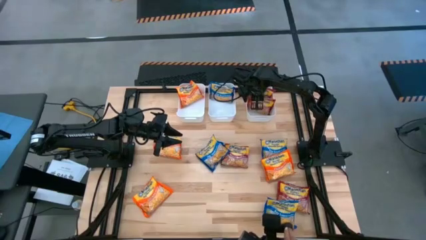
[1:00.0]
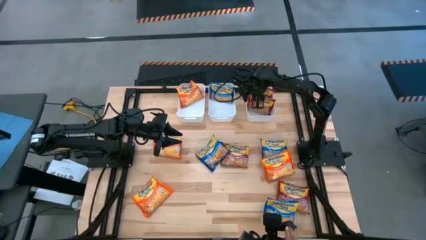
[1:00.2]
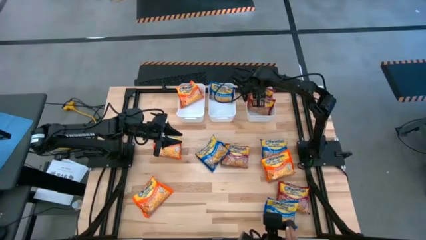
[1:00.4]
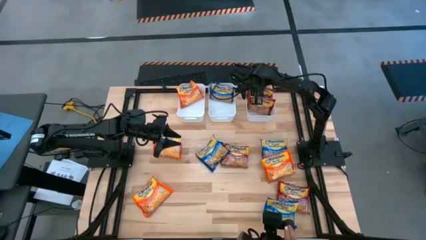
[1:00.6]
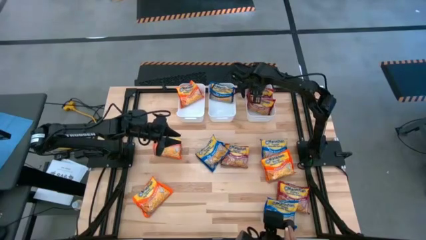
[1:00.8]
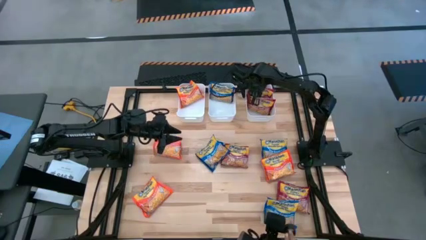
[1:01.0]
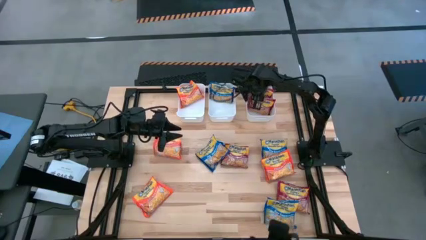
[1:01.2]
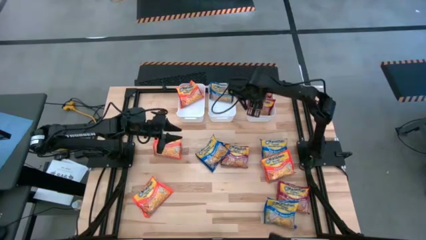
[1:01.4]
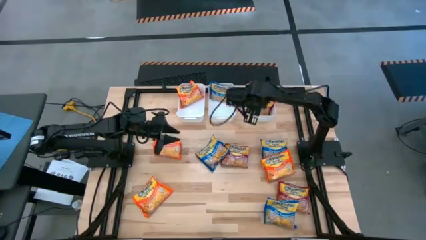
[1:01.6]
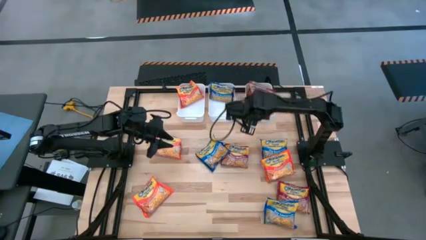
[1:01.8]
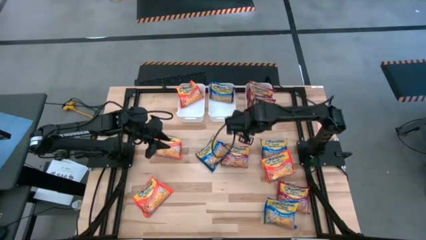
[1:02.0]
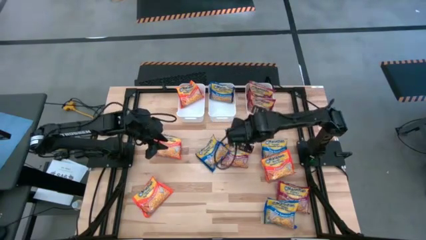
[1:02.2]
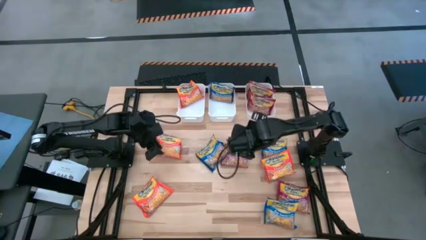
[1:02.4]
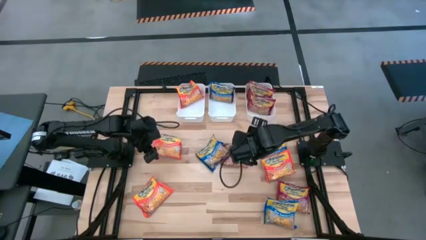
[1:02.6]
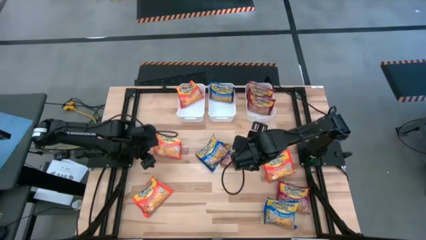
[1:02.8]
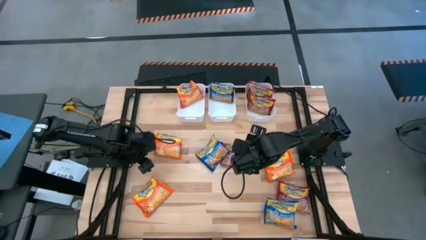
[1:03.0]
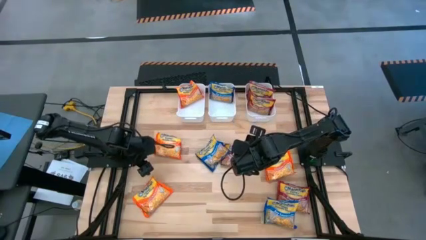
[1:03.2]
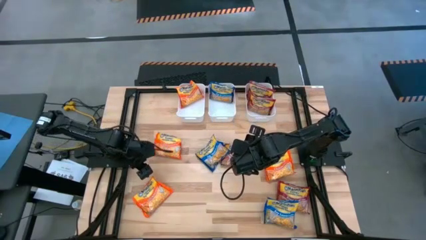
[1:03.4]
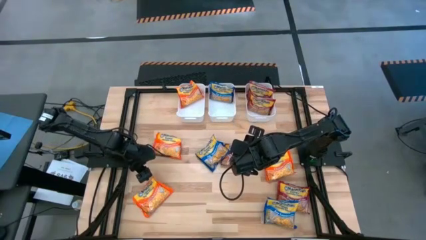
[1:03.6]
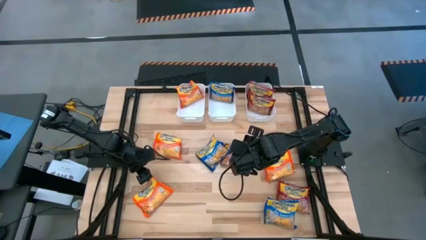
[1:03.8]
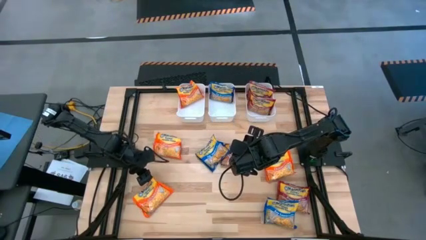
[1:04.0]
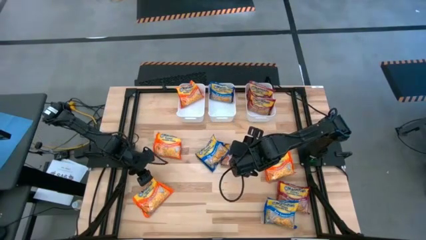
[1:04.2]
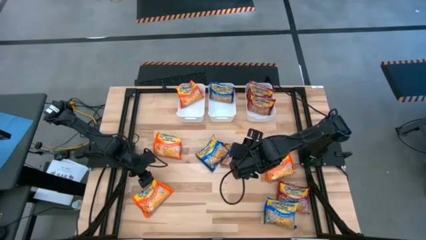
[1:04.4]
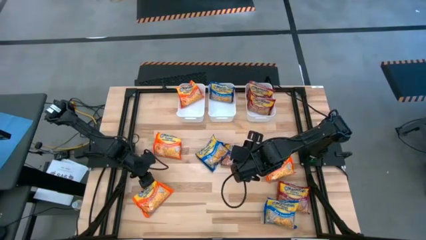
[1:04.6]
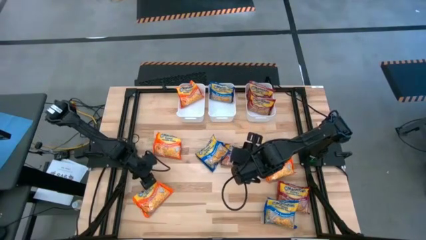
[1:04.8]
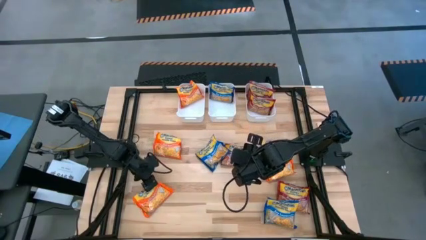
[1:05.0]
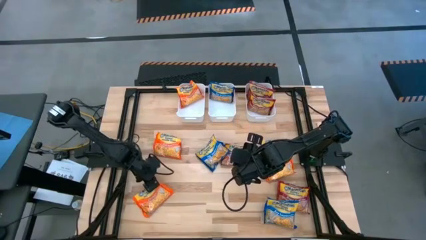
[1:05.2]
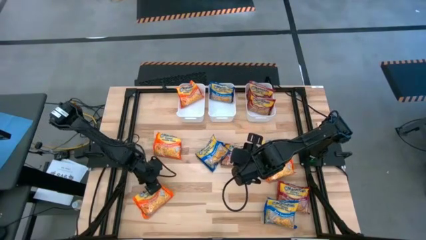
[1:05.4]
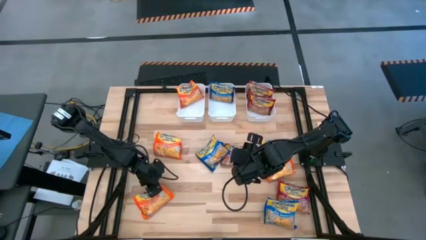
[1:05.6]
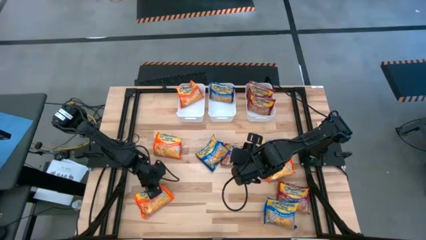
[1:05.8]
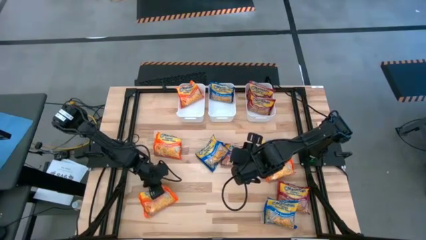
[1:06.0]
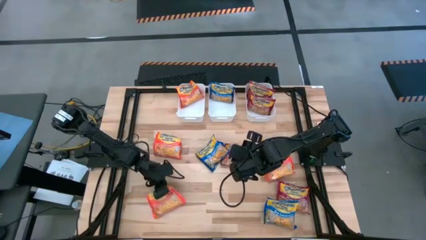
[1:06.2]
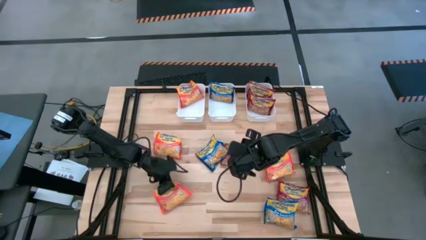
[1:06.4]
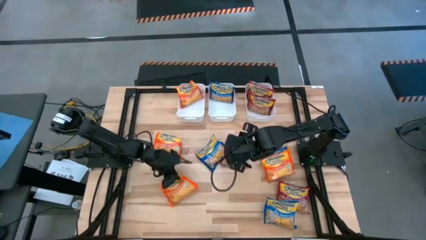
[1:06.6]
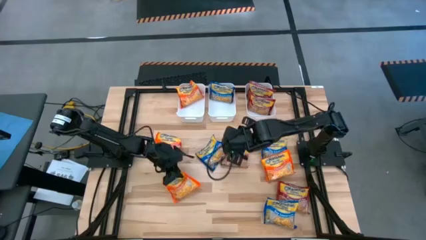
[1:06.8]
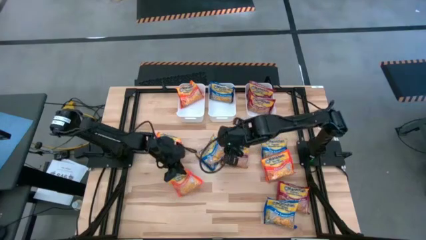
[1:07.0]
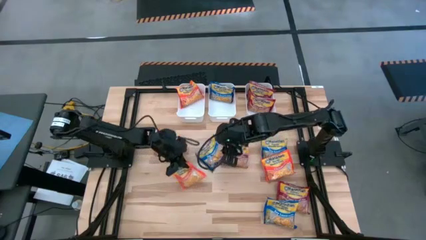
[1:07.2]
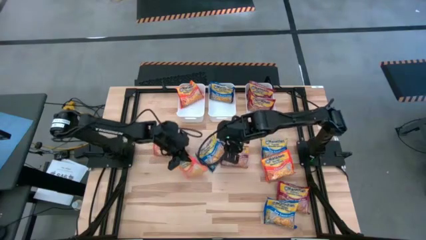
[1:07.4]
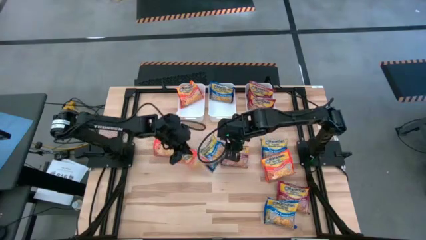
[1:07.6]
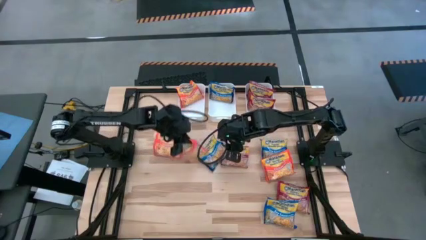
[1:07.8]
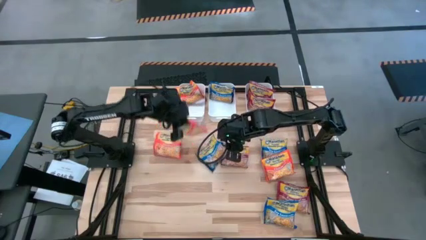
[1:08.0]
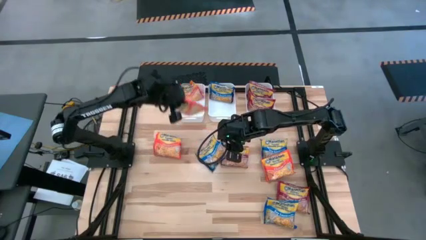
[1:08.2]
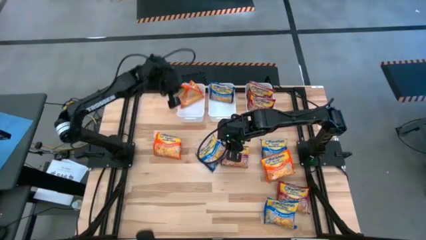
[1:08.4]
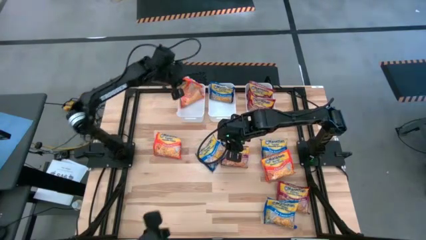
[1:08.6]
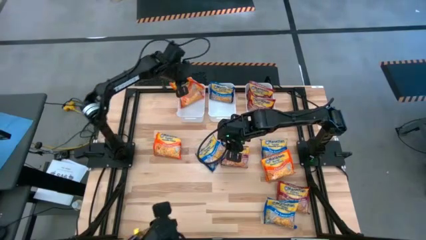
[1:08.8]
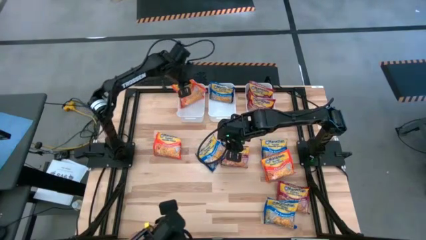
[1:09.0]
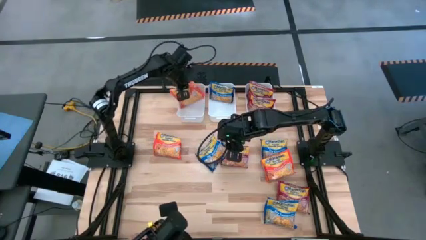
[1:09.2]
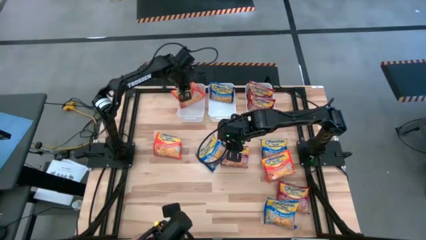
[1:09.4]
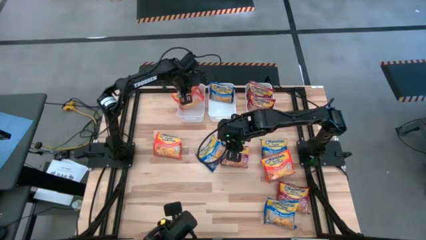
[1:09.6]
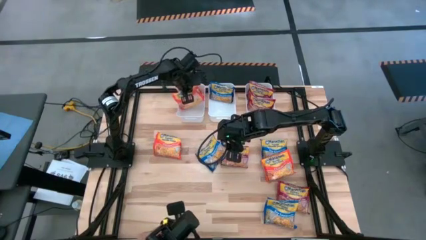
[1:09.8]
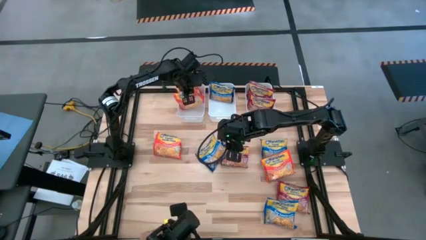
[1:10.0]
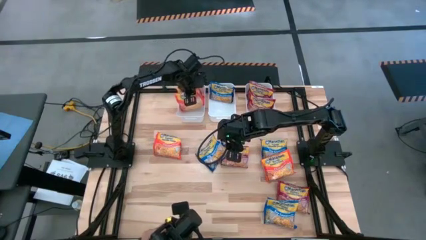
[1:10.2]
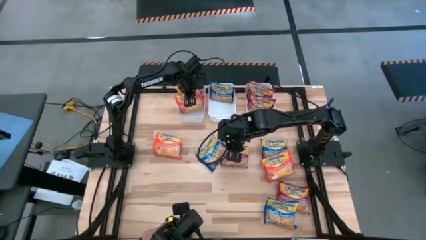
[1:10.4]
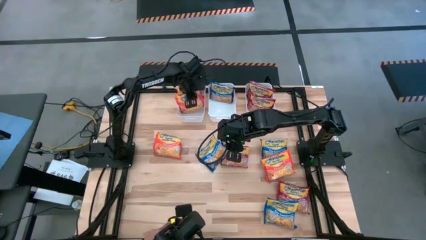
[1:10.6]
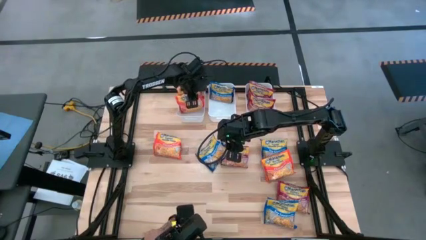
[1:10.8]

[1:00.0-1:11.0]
Task: Sort Maruchan noodles
Put the orange noodle pack into the left white bin

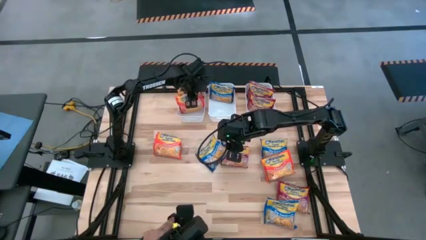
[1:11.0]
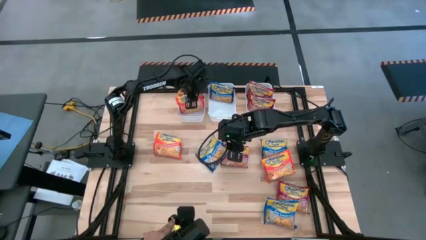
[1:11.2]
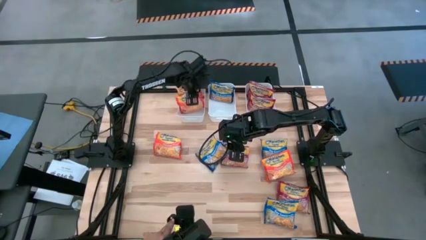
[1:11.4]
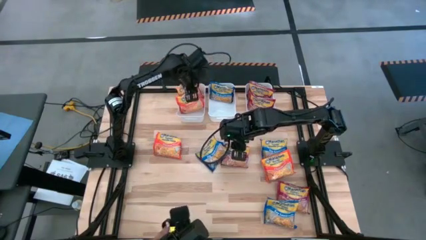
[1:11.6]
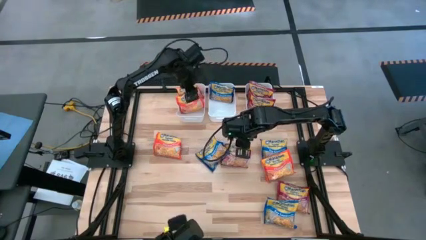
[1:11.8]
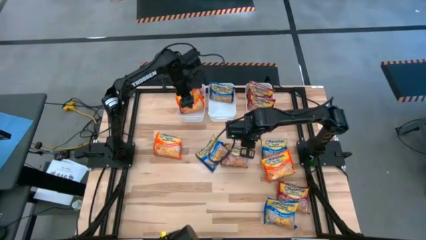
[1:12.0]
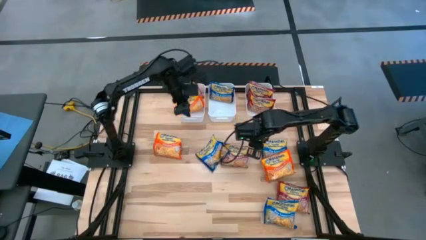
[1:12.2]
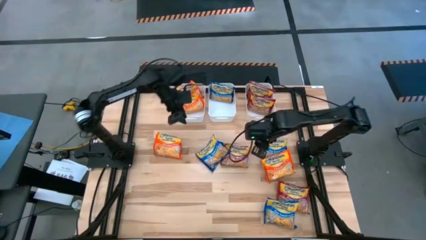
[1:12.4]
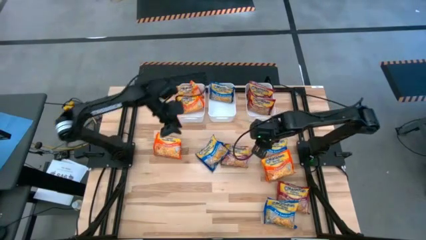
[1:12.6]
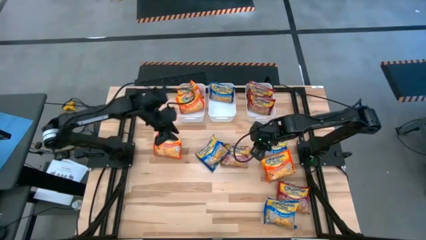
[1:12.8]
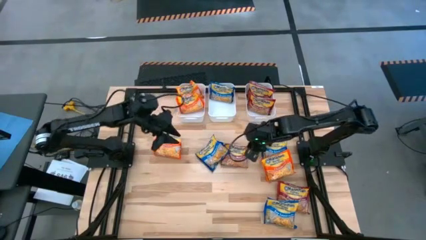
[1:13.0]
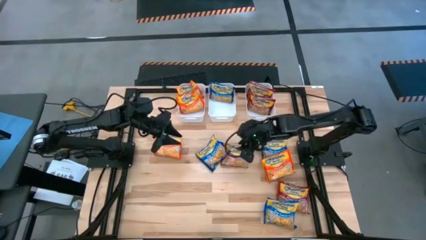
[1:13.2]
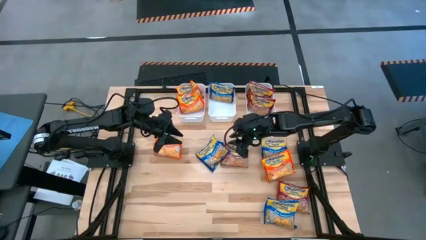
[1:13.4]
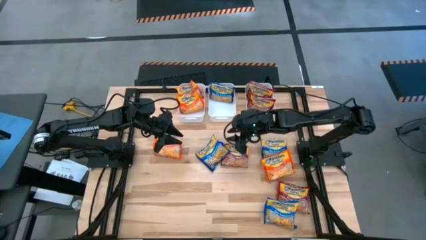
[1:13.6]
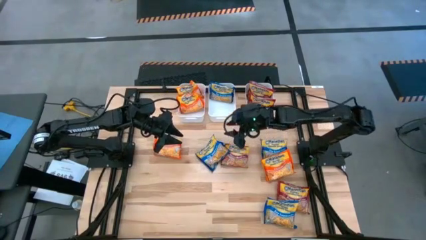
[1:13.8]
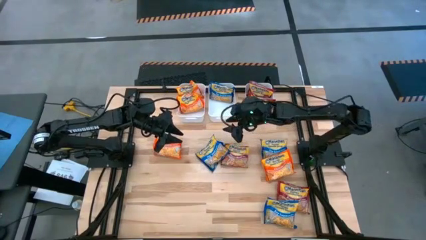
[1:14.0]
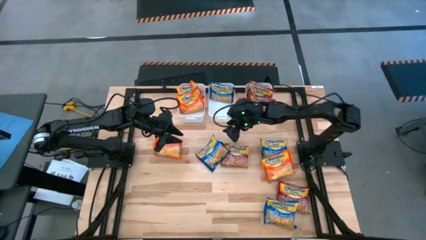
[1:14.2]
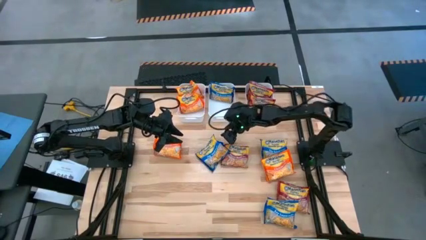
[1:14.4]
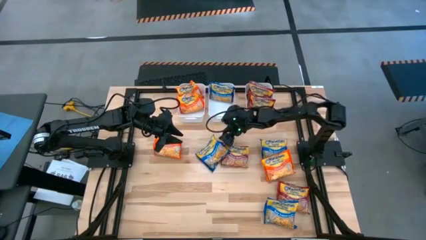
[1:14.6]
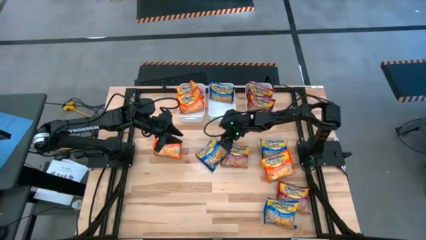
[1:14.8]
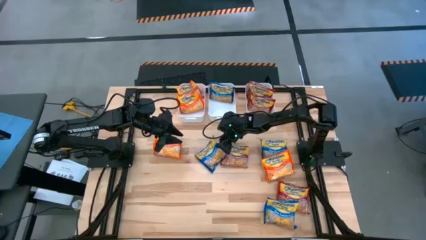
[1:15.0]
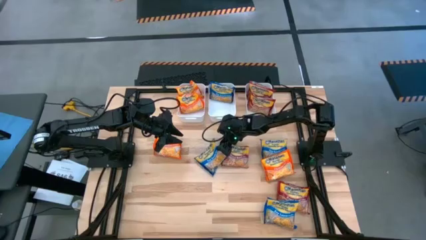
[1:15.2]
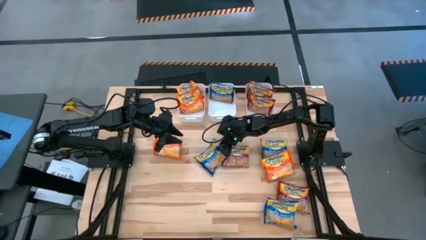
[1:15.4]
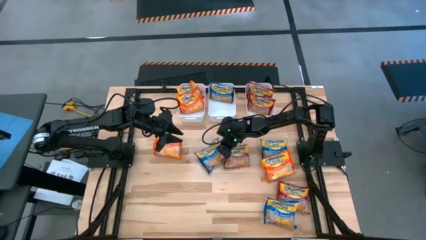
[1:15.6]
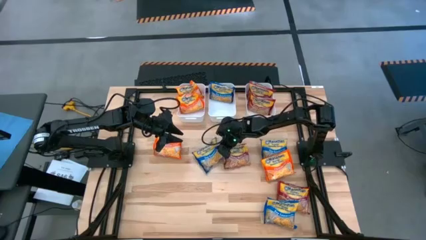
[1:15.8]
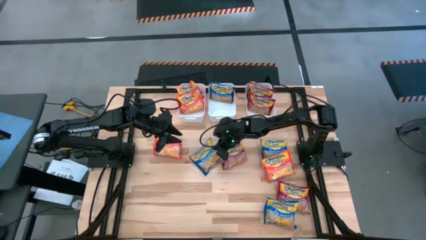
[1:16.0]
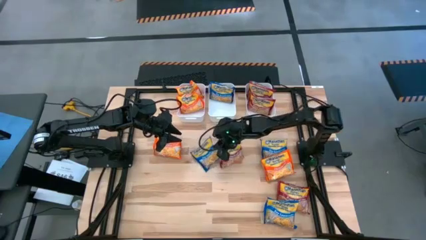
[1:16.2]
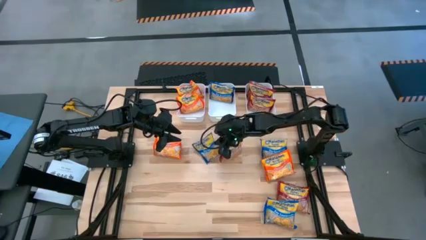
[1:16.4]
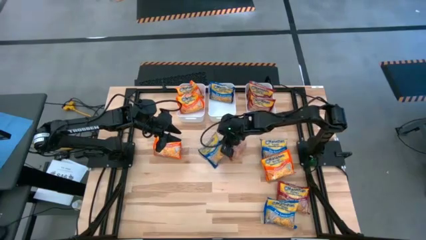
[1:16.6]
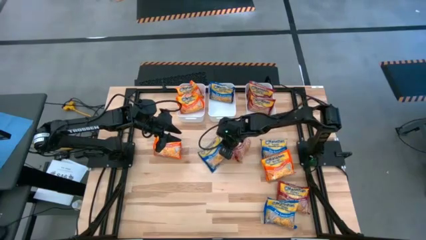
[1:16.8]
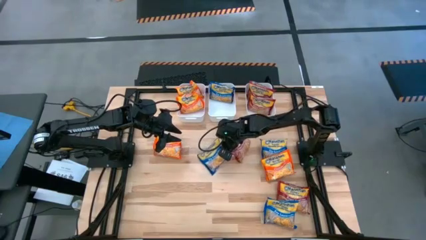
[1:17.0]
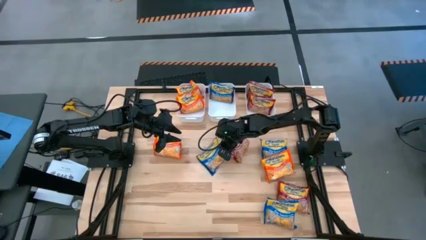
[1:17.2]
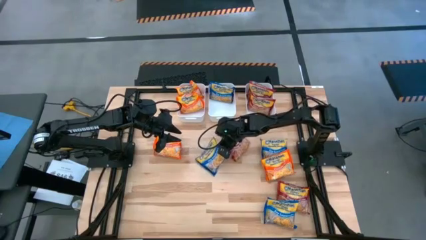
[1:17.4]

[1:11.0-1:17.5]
Put the blue noodle pack into the middle white bin
